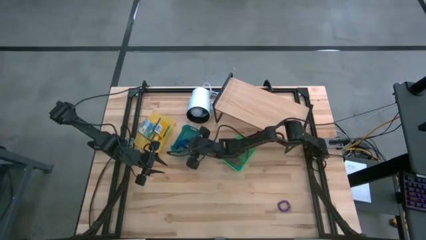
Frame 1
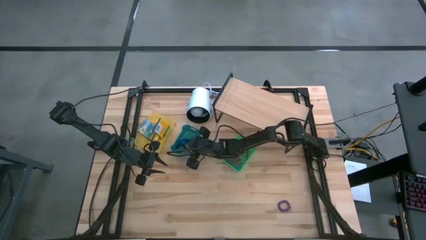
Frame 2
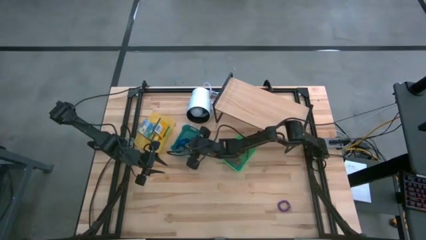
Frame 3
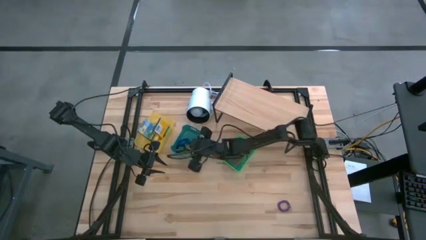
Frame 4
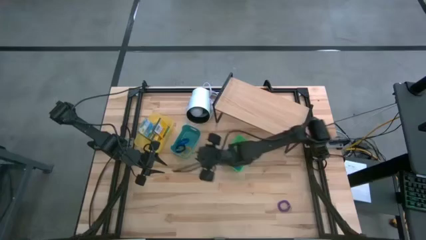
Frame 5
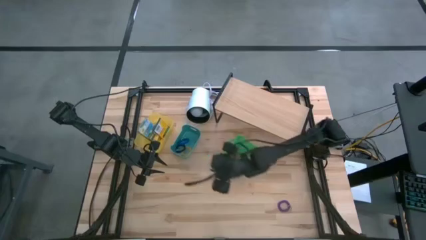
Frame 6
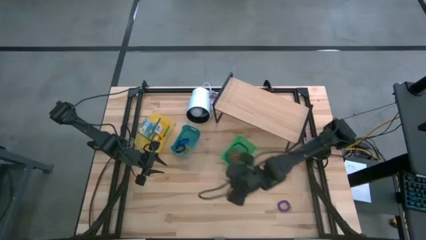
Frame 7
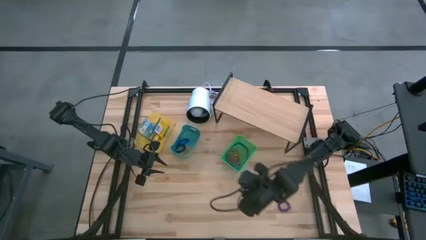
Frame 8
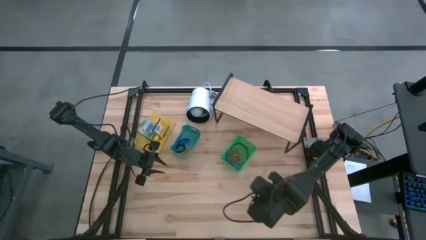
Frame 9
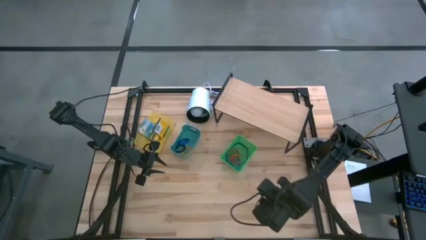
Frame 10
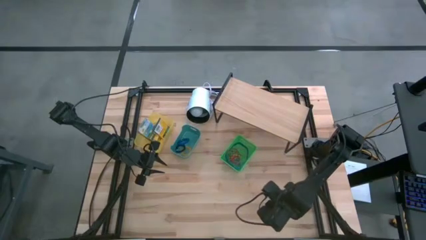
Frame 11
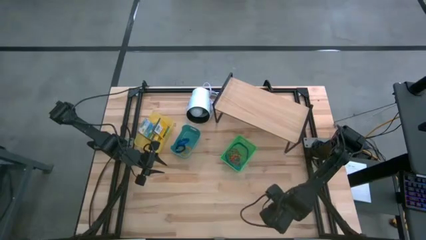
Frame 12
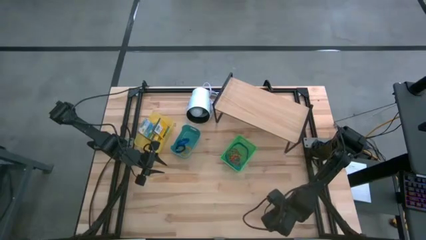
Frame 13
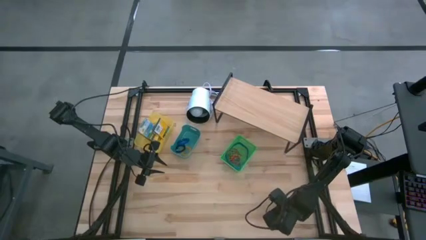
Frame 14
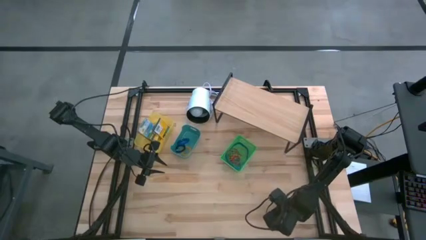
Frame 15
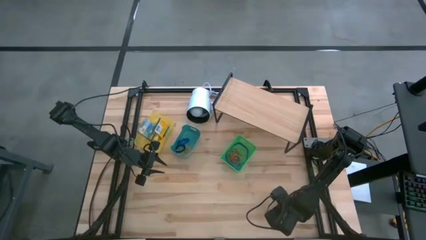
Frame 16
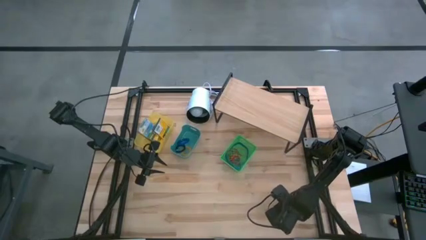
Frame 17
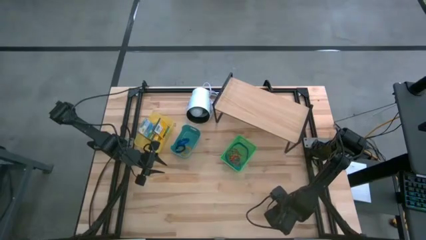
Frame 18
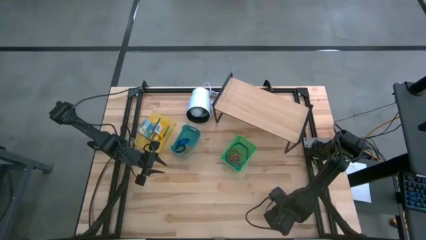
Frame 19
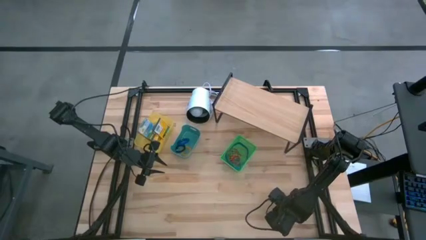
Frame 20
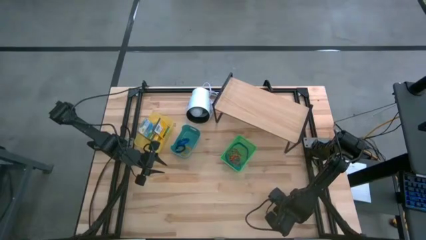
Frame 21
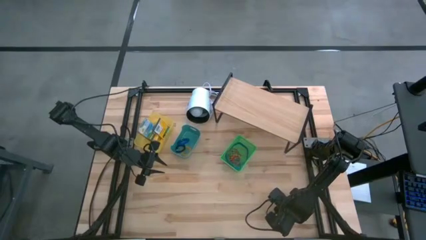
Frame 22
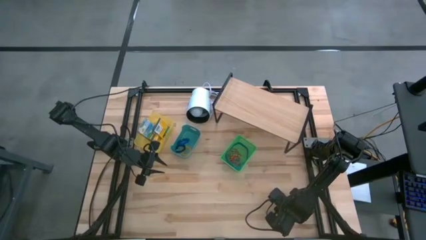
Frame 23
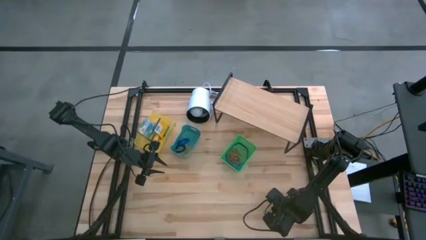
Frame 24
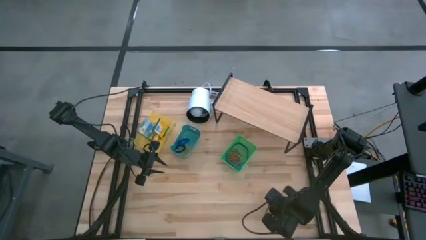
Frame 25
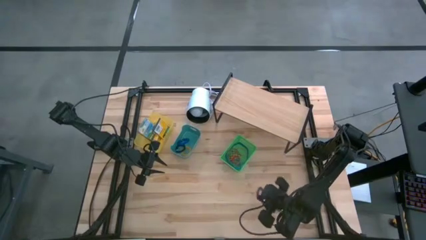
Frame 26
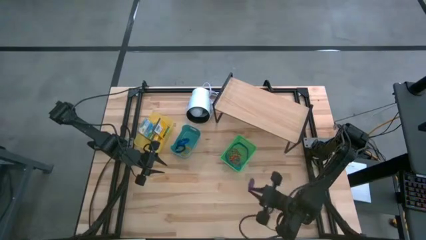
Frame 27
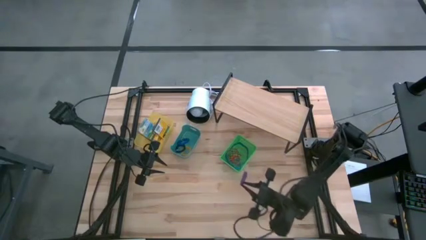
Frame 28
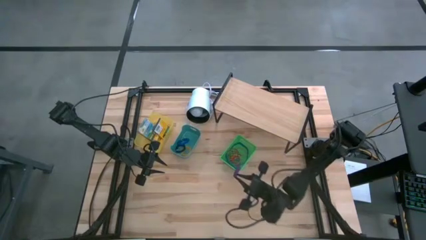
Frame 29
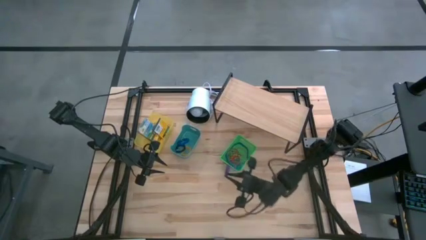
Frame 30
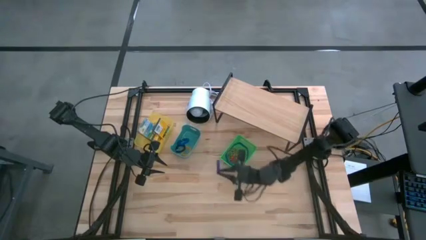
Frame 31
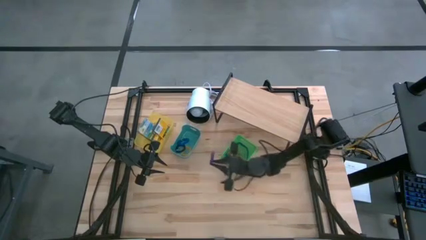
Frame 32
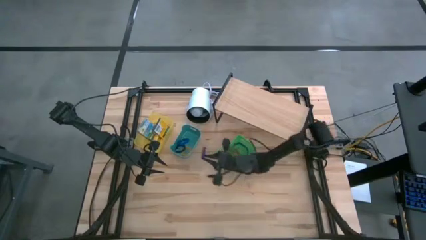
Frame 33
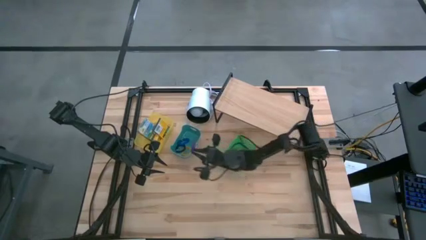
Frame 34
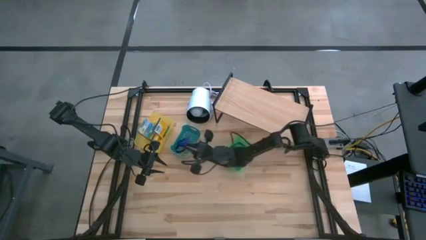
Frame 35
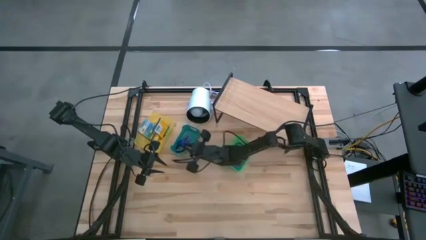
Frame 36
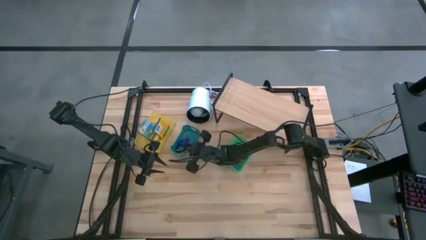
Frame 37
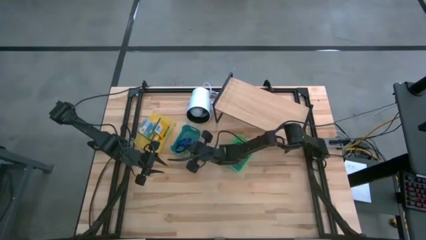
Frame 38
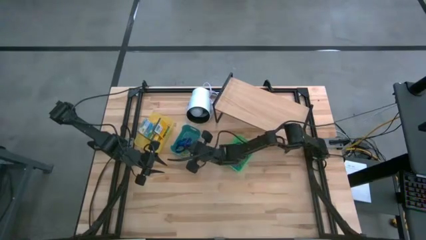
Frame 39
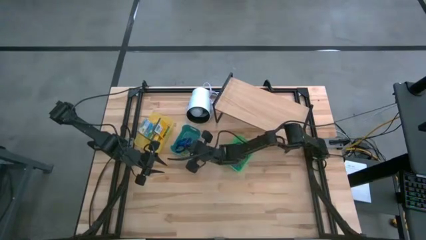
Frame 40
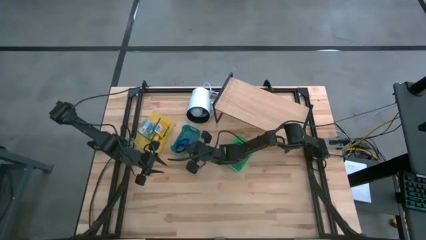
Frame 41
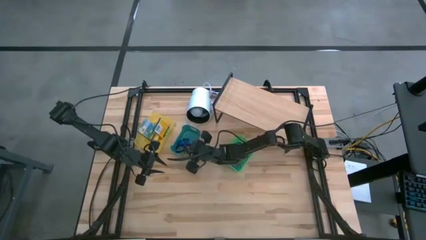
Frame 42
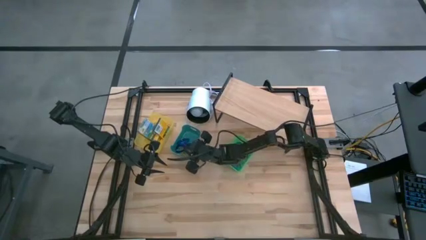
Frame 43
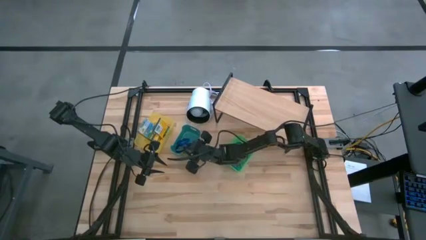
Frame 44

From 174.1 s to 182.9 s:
Task: Pick & Place Office Desk Supplies
Put the violet spring keychain into the blue bin

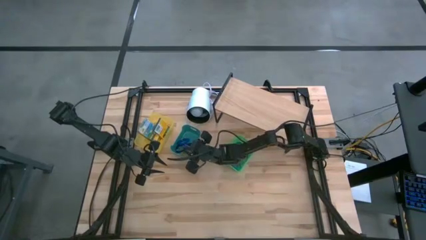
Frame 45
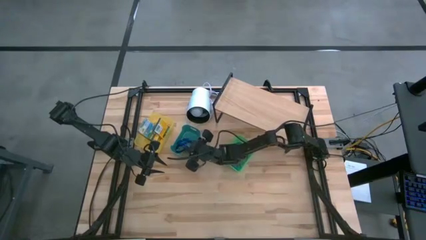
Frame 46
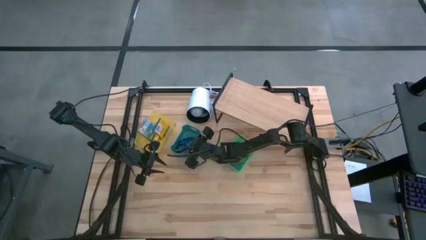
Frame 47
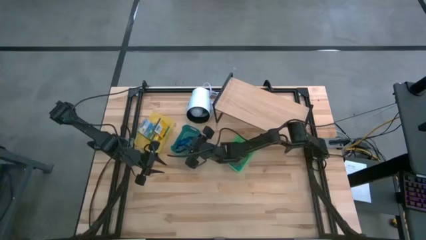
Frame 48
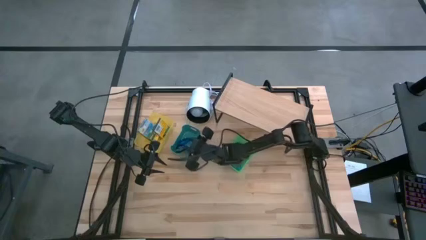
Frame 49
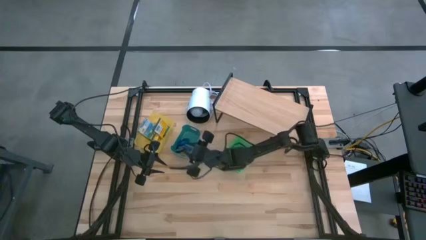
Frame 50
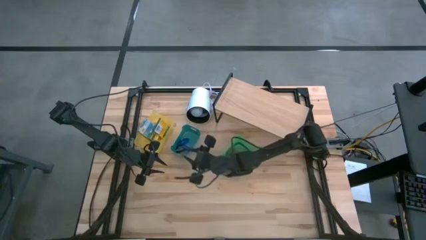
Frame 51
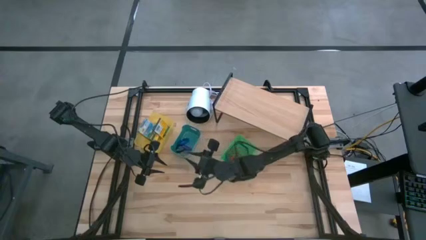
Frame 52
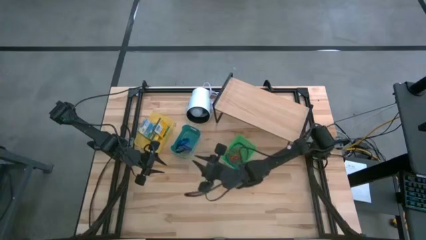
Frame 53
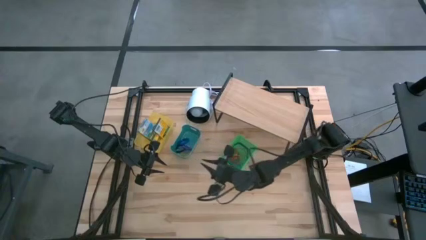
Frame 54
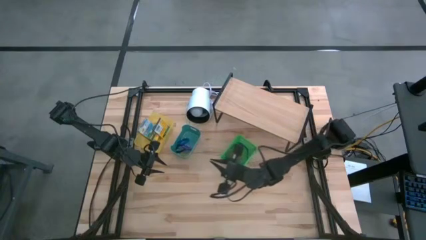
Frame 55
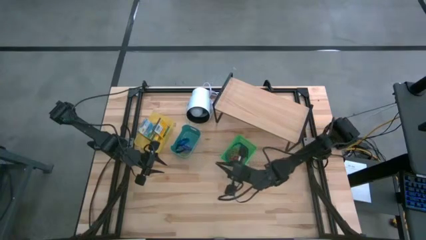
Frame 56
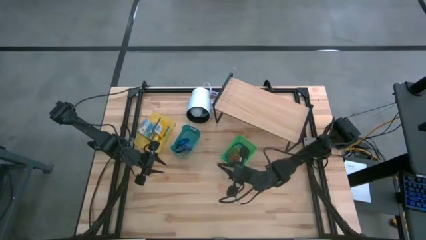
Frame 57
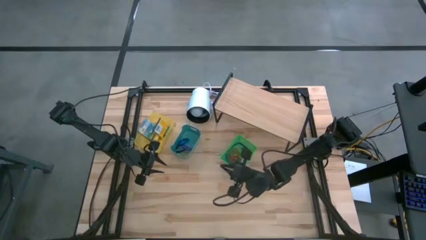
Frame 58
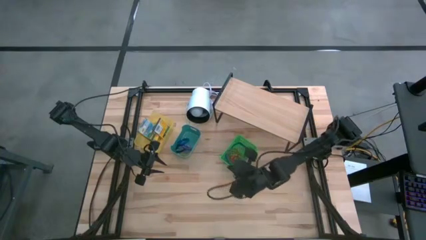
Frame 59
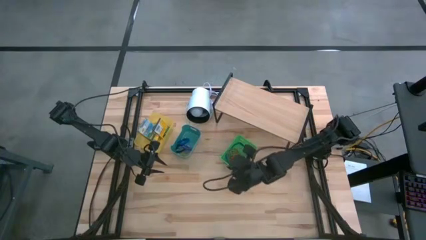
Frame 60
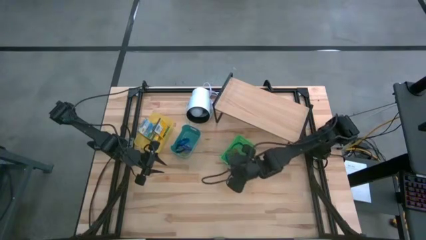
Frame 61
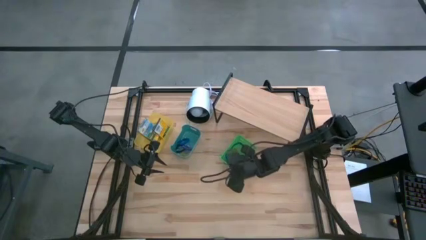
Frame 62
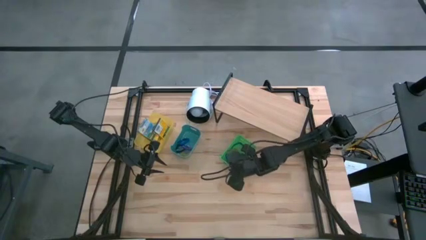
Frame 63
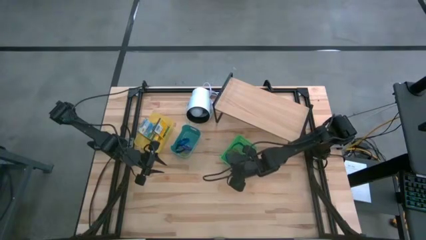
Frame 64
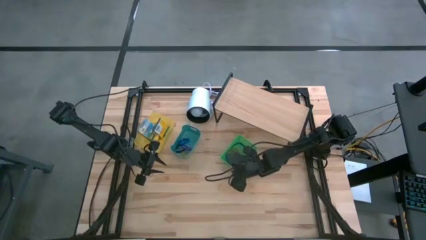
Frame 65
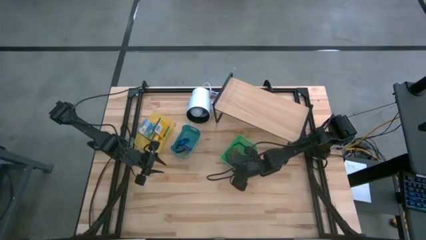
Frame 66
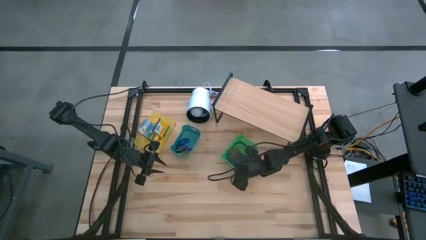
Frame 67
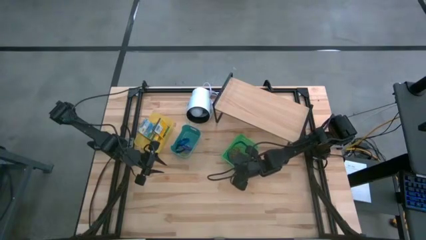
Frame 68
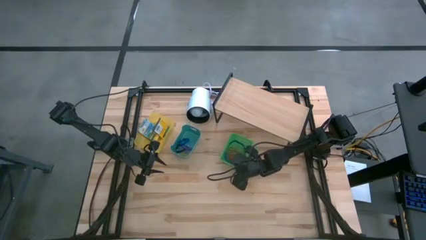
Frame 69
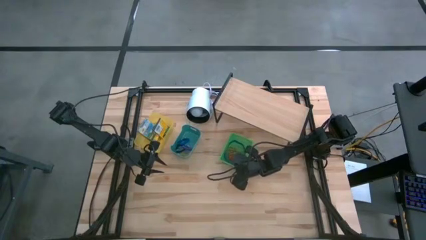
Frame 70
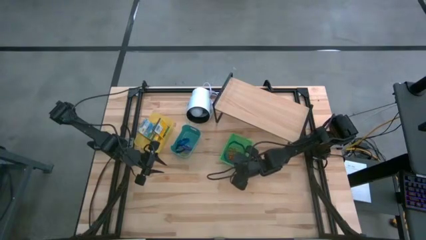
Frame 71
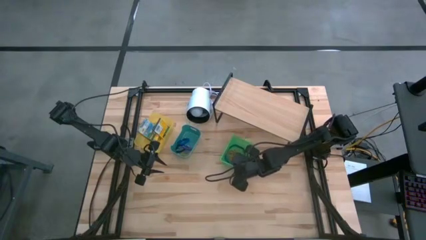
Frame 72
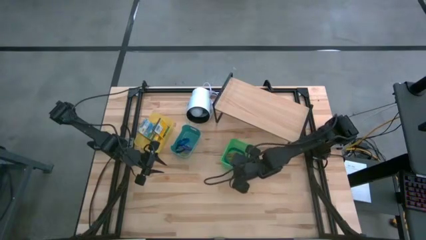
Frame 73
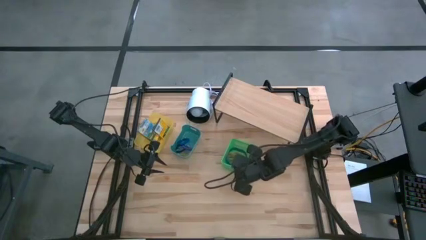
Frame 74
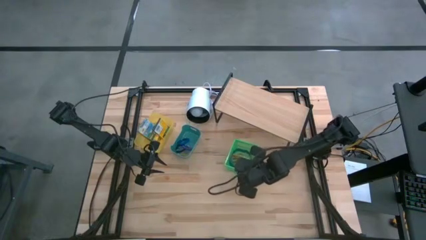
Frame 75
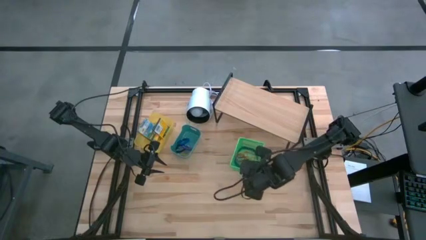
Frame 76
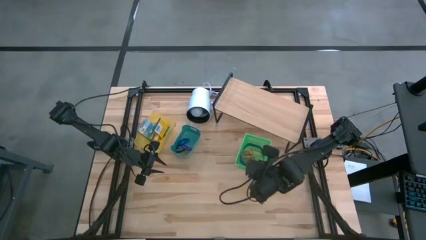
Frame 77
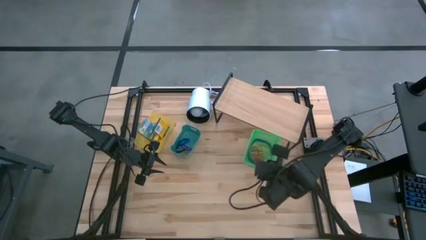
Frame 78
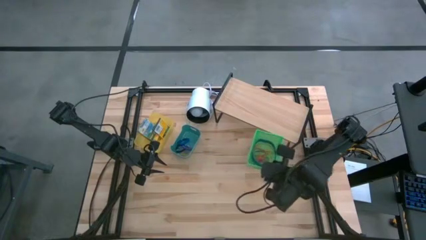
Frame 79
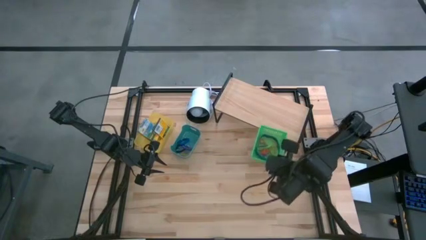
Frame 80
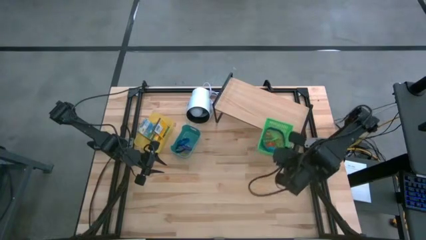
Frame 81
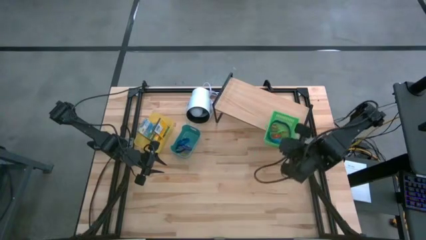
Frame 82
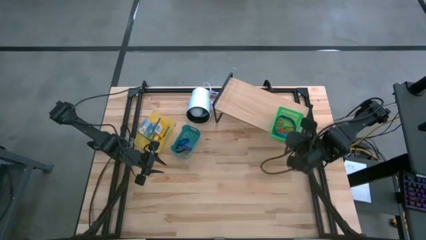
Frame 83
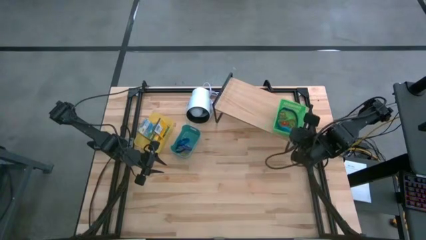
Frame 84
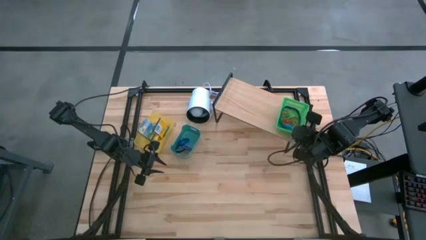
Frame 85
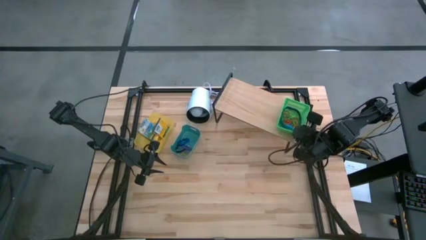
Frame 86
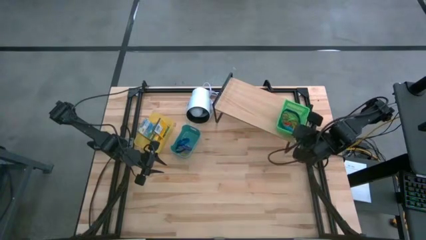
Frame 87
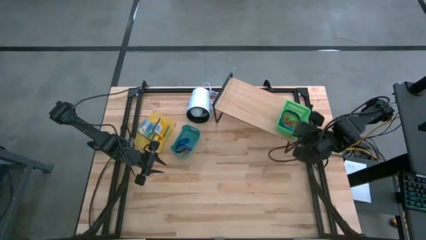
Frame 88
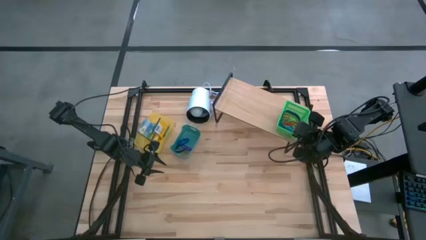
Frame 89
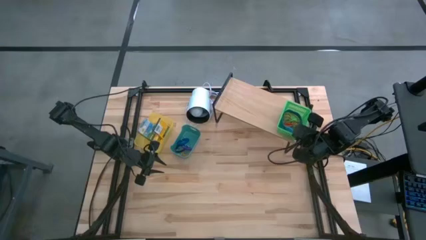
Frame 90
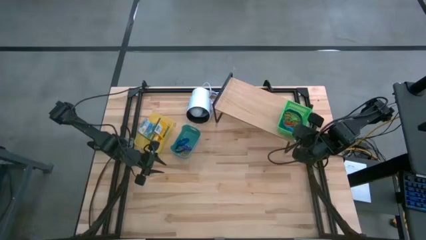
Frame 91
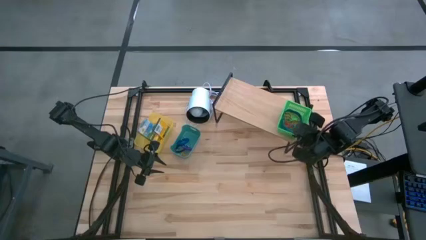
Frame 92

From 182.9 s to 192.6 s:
Put the green bin on the shelf
